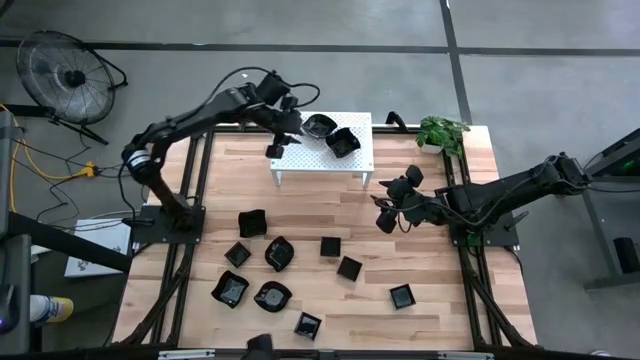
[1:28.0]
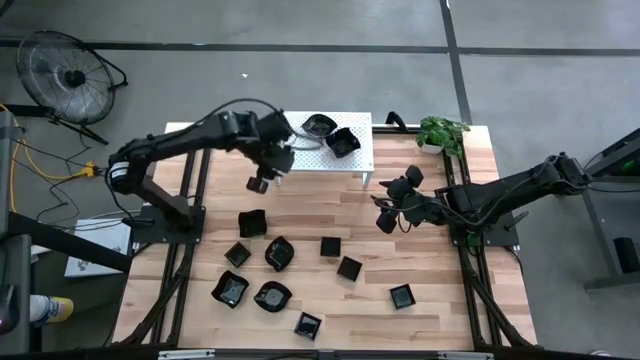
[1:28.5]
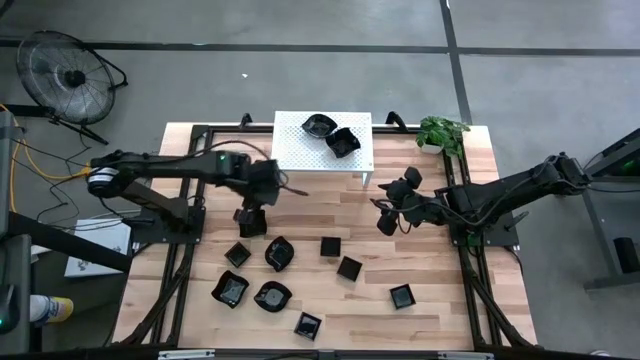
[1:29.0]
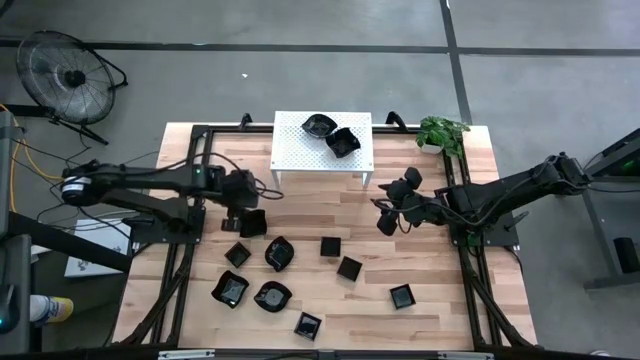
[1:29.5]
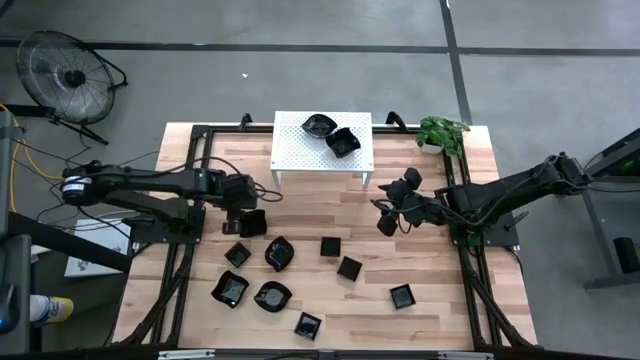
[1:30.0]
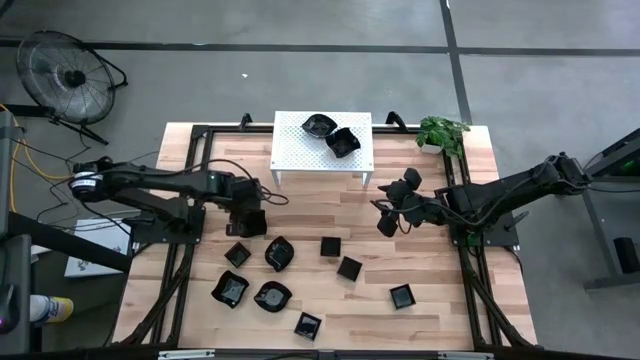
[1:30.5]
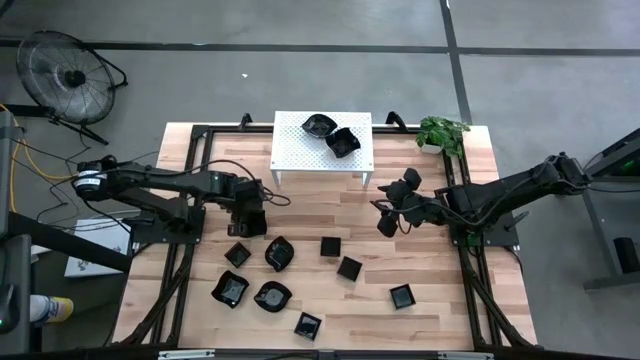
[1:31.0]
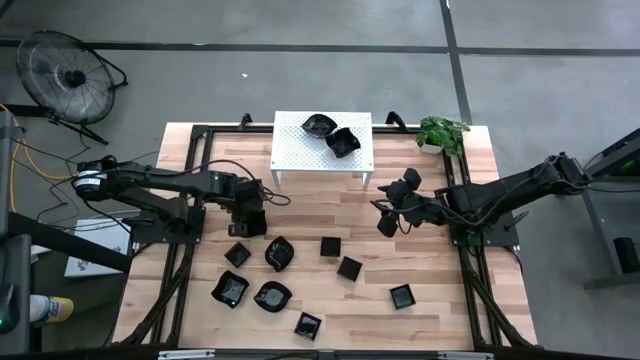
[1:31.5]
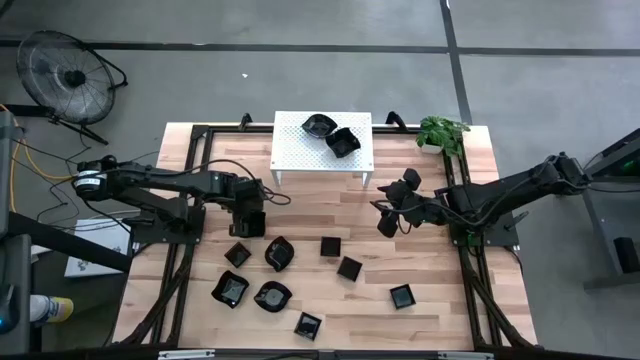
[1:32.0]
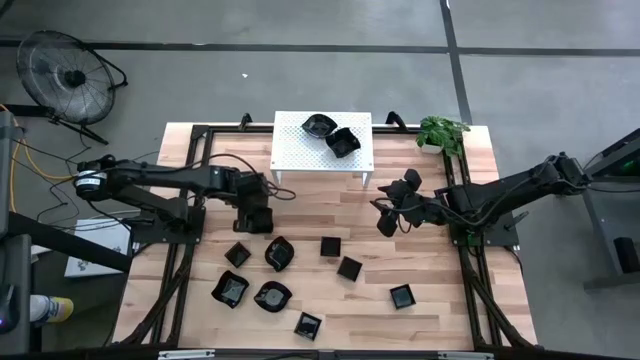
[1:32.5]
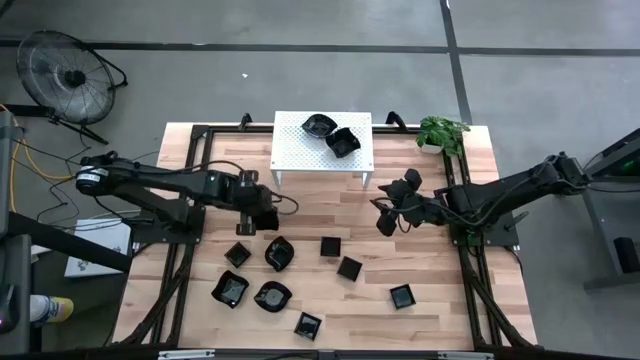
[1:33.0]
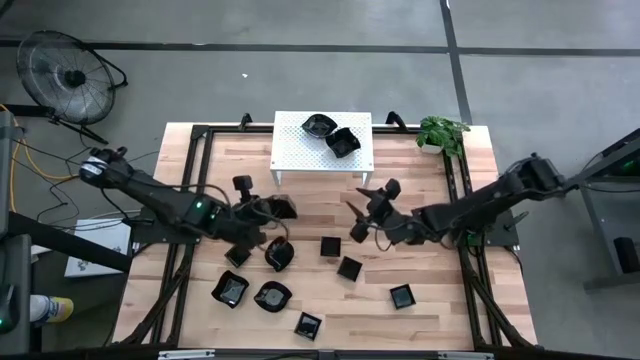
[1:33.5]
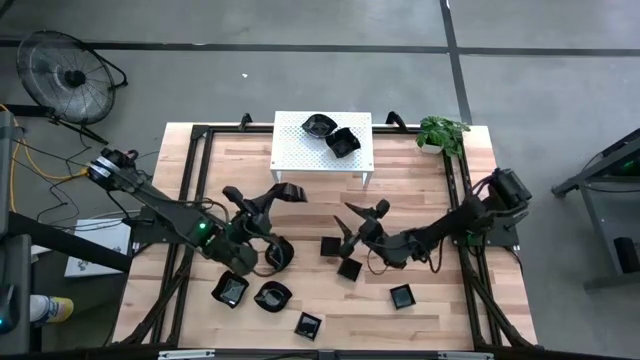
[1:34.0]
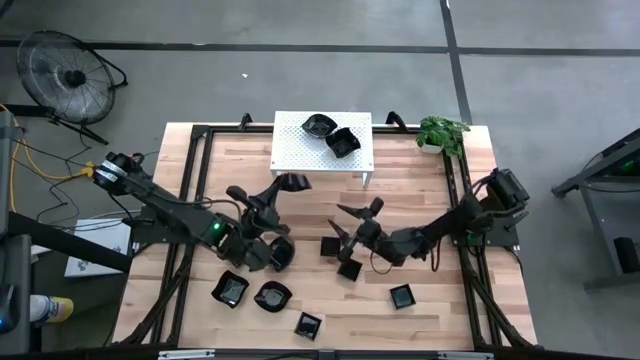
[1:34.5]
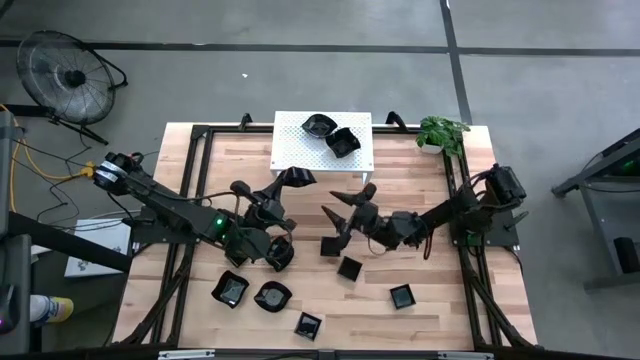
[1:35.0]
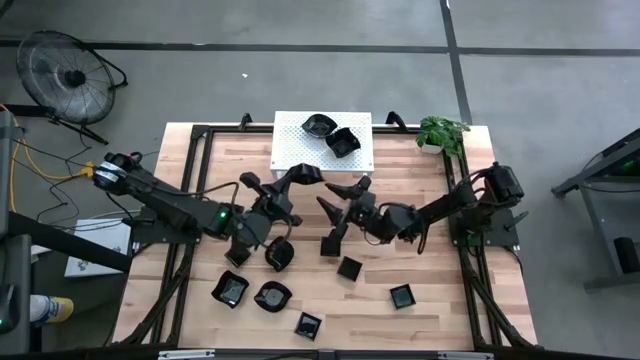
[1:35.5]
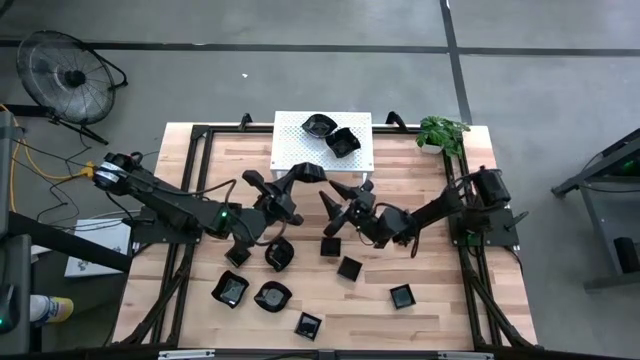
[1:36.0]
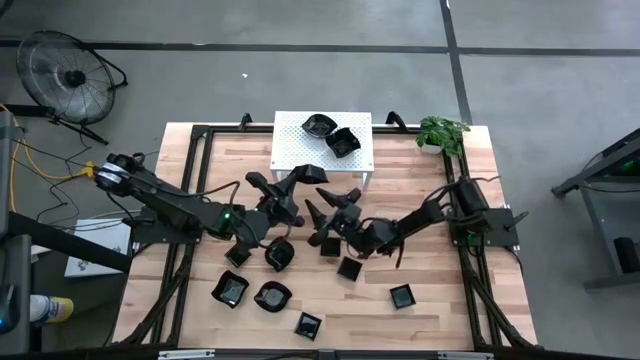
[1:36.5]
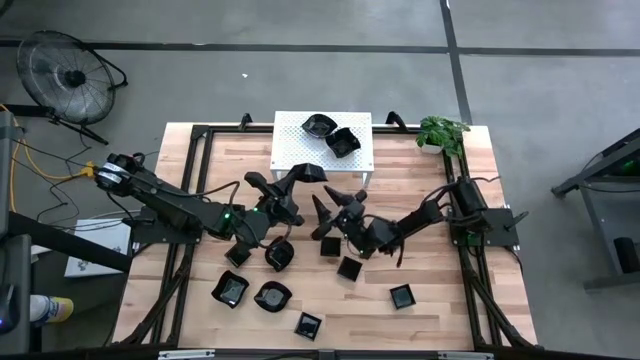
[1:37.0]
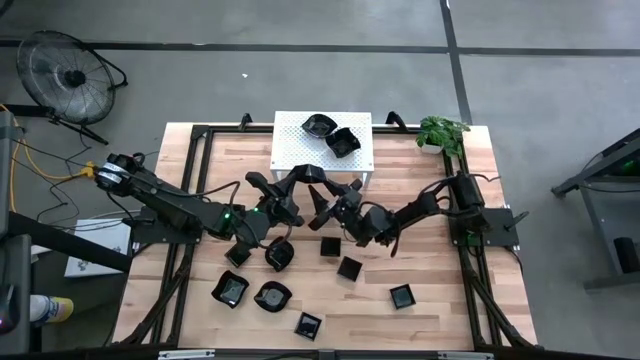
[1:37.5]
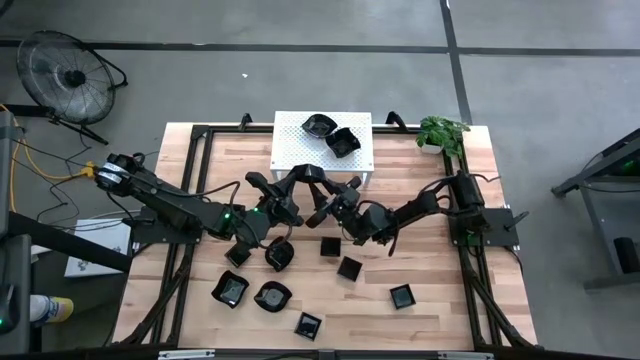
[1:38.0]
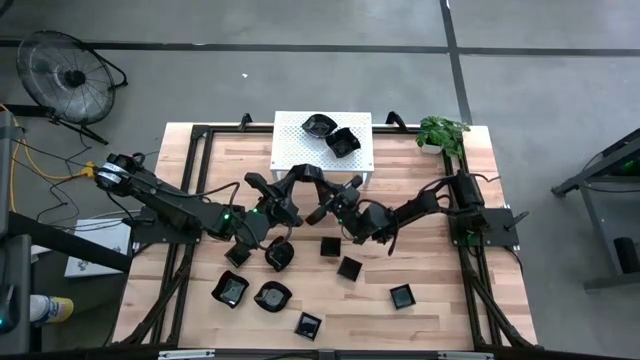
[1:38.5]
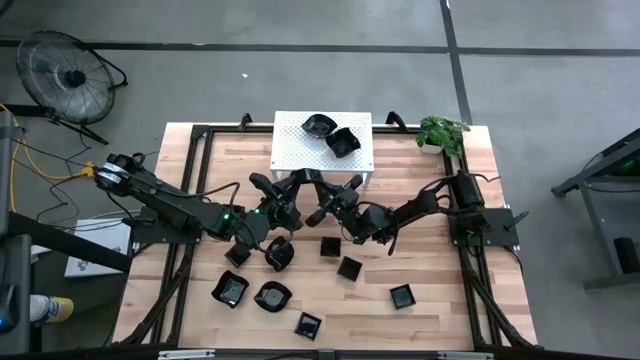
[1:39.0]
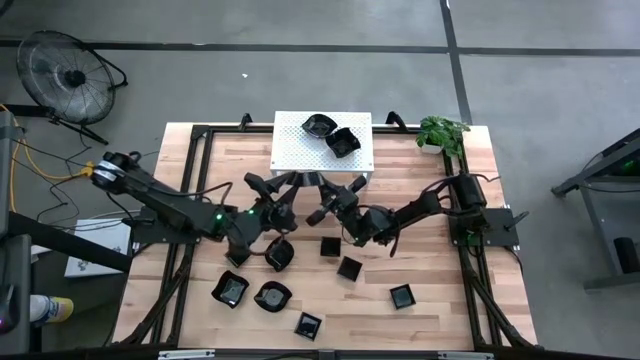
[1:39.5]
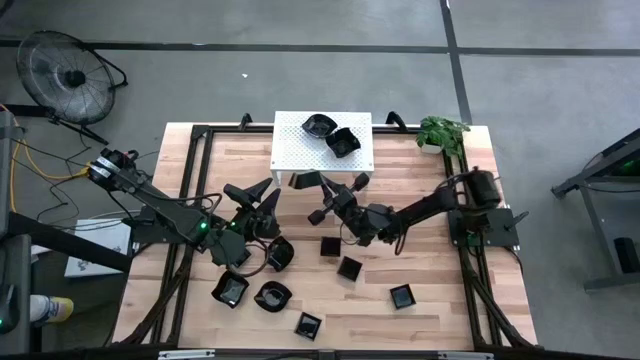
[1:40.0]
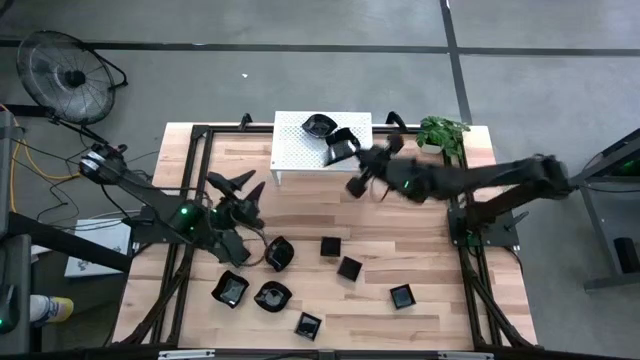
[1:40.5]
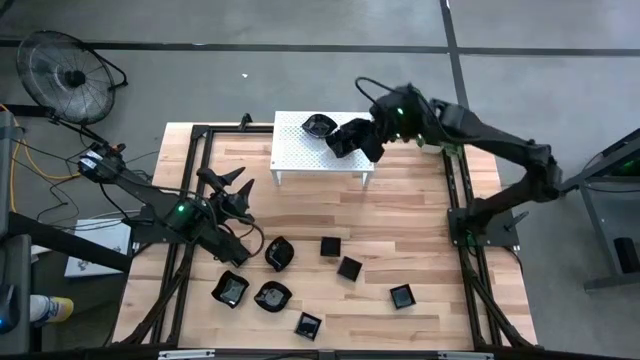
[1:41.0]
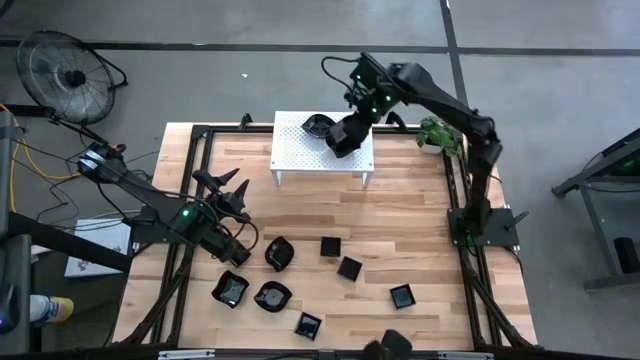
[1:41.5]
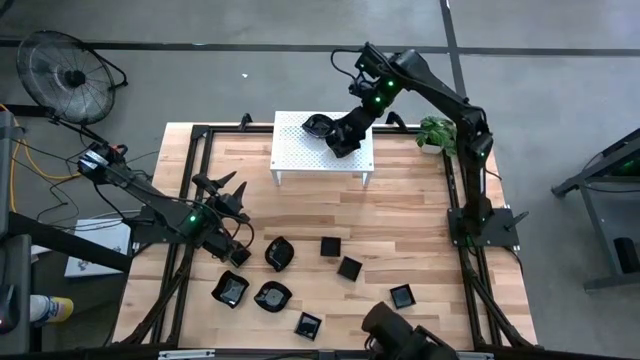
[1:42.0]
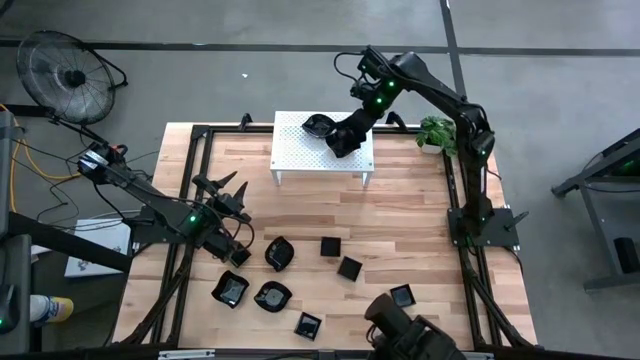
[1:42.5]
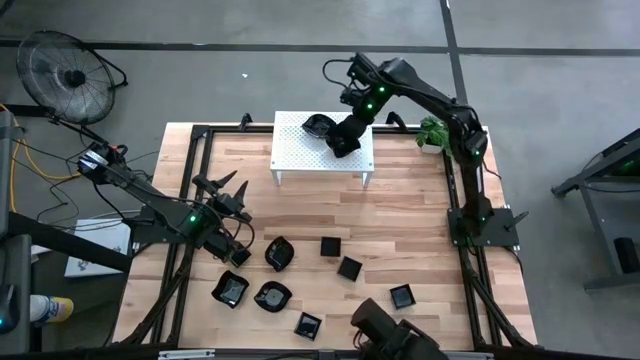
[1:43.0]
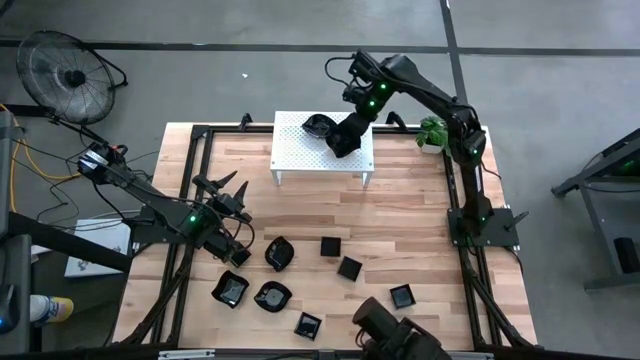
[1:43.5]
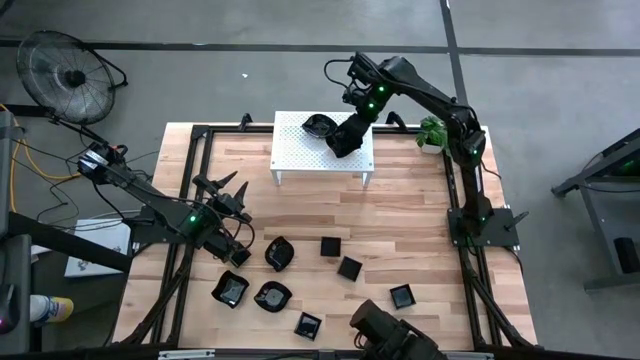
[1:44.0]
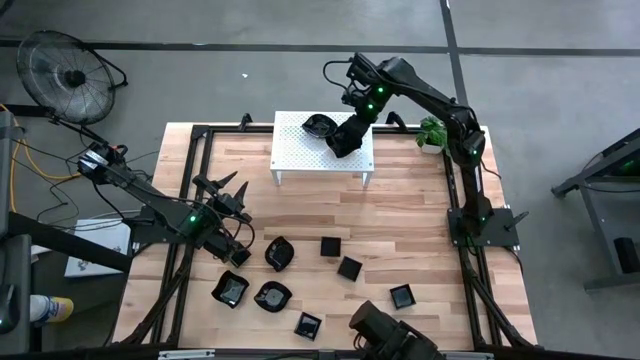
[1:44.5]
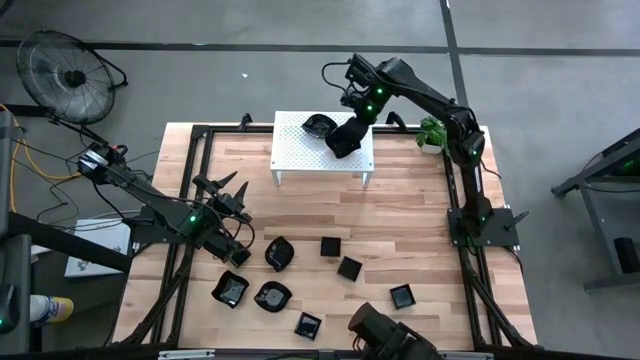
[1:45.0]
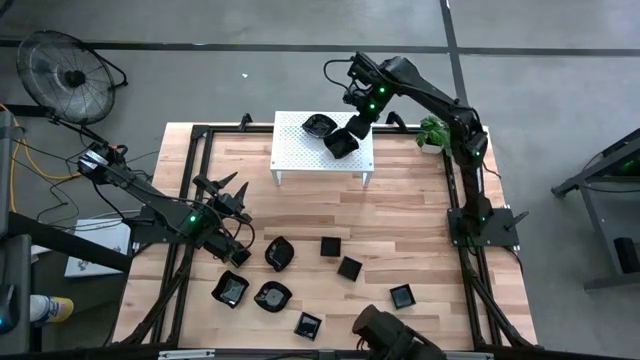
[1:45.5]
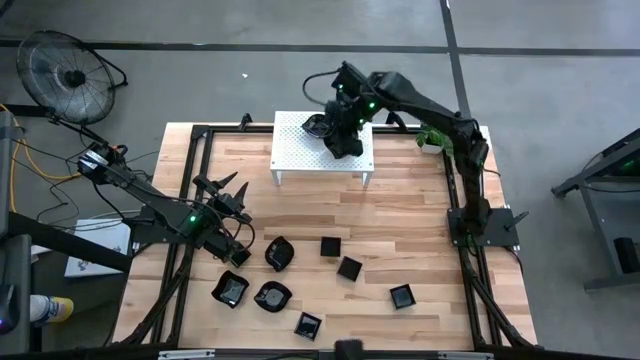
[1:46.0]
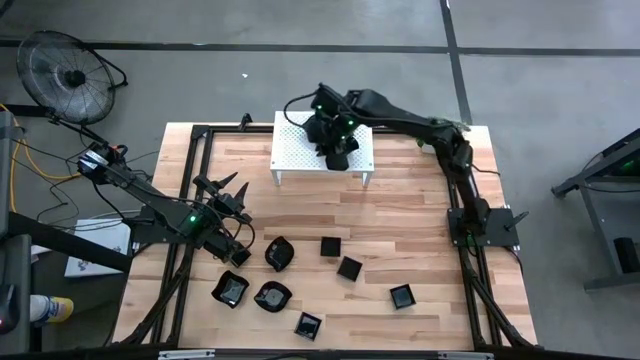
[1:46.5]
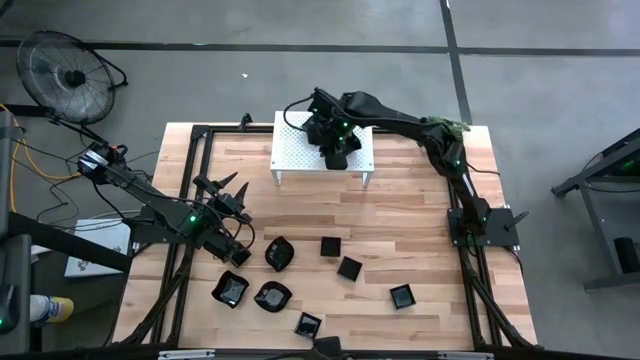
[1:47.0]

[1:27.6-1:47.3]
Task: Pick & Place Mini shaped plates
Stack the black distorted square plate on top of the black distorted square plate on the shelf

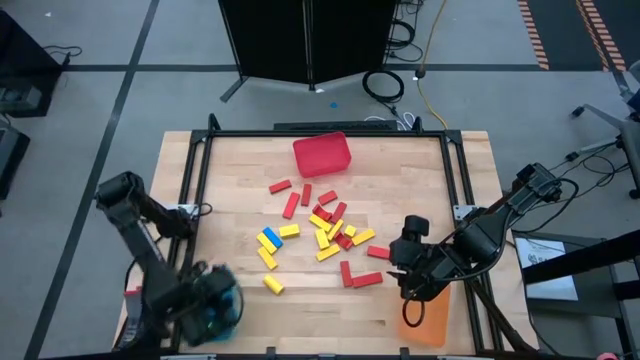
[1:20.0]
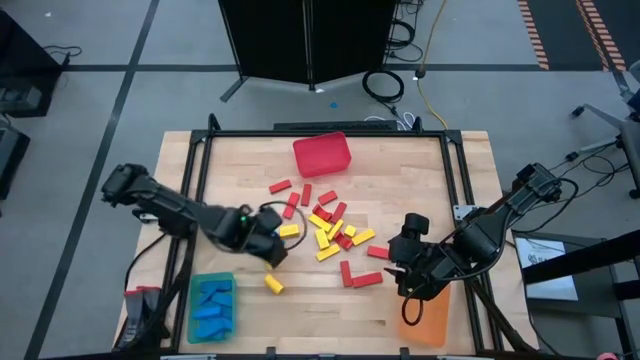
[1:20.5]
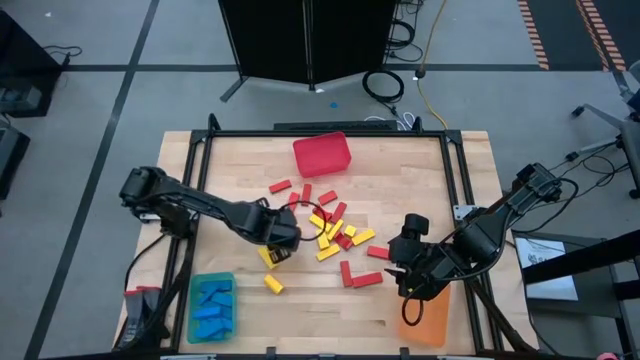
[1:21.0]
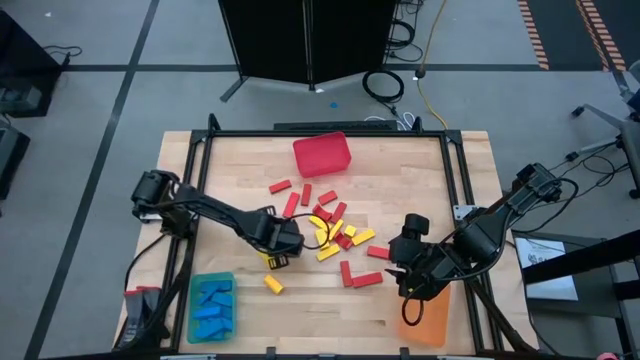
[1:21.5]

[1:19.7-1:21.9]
Task: Sort blocks
Put the blue block into the green bin
